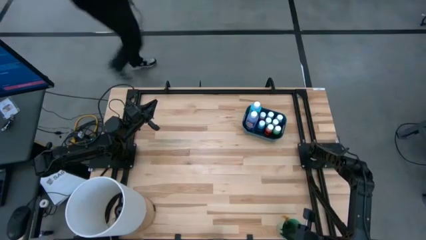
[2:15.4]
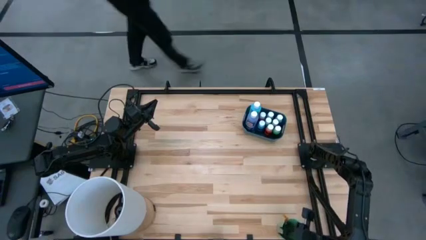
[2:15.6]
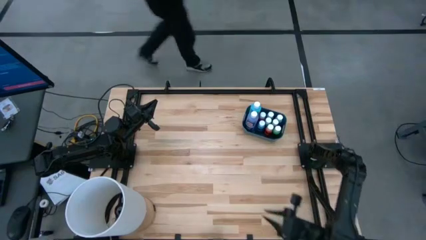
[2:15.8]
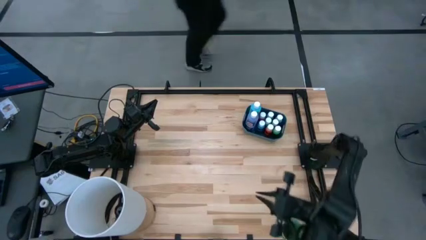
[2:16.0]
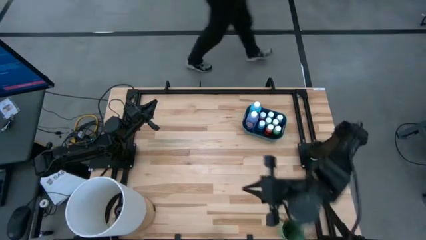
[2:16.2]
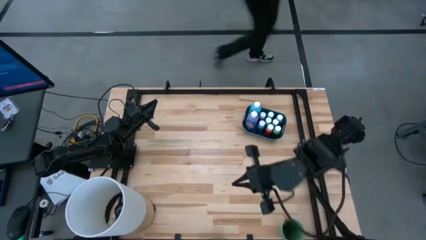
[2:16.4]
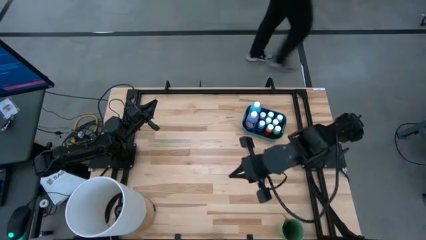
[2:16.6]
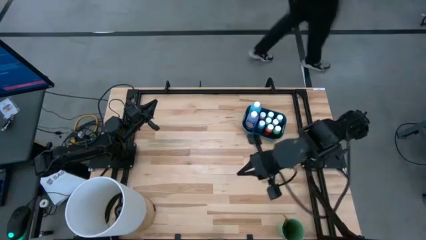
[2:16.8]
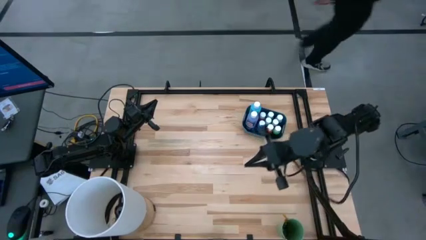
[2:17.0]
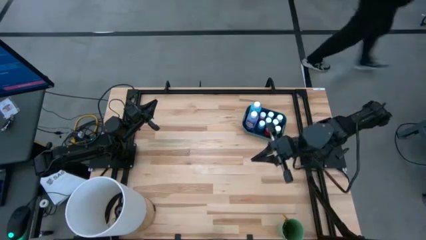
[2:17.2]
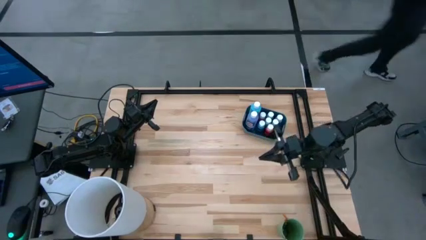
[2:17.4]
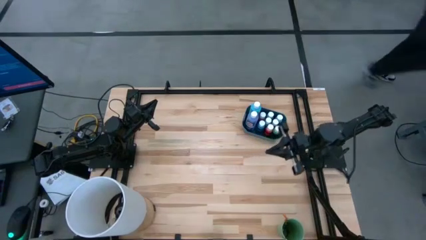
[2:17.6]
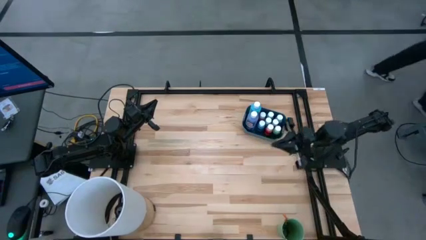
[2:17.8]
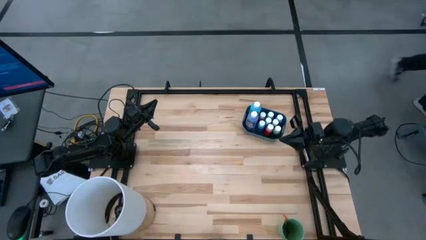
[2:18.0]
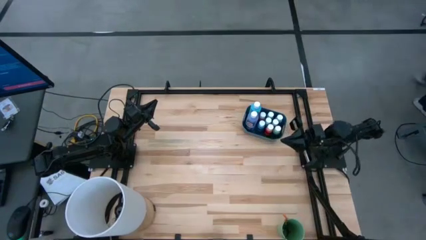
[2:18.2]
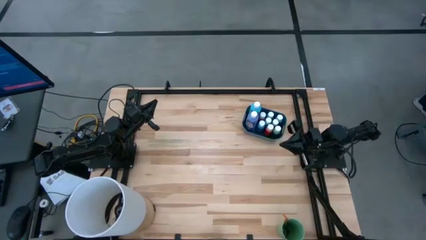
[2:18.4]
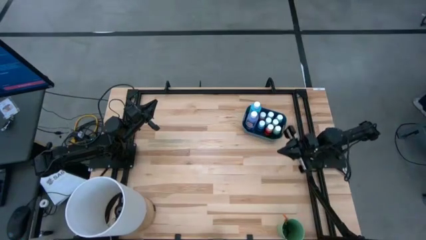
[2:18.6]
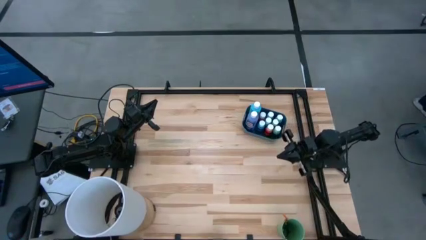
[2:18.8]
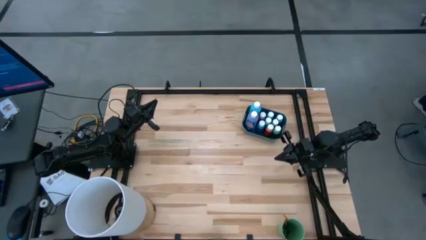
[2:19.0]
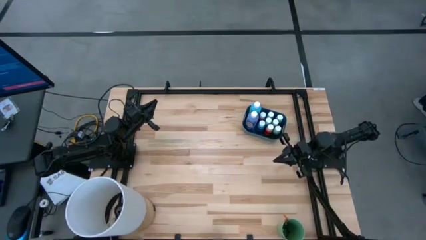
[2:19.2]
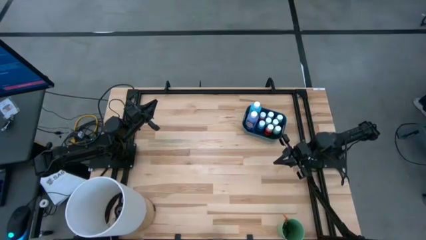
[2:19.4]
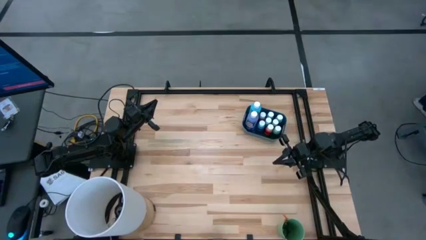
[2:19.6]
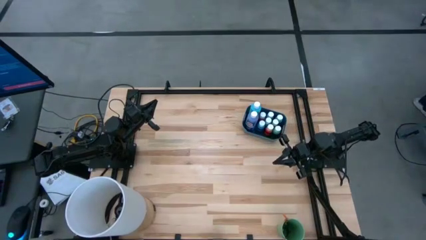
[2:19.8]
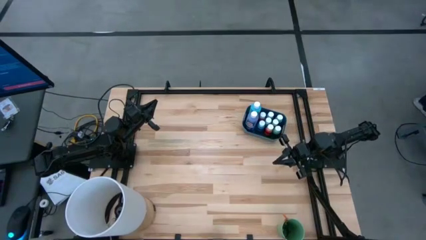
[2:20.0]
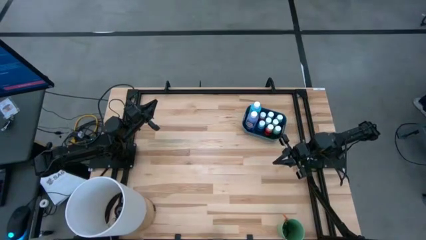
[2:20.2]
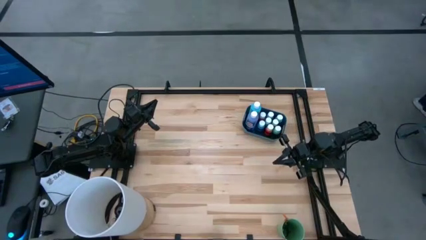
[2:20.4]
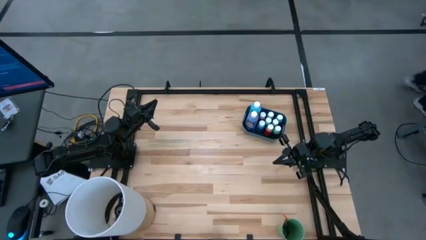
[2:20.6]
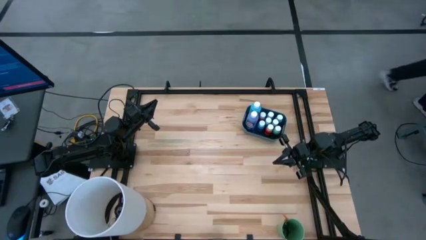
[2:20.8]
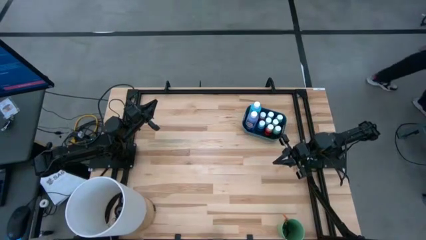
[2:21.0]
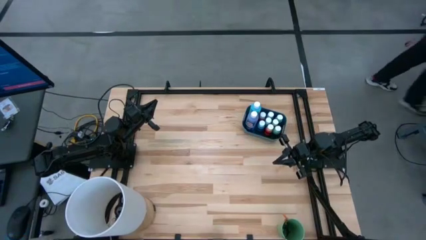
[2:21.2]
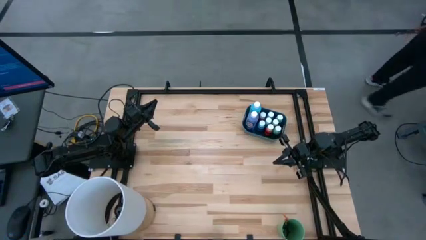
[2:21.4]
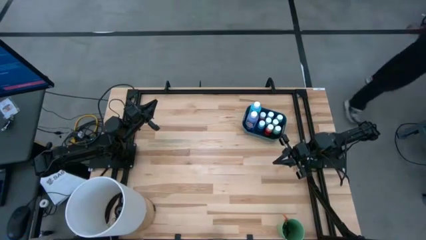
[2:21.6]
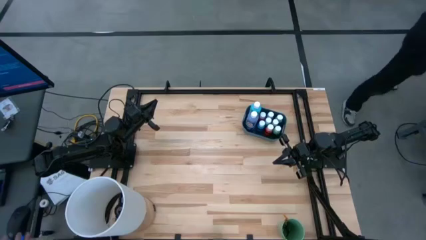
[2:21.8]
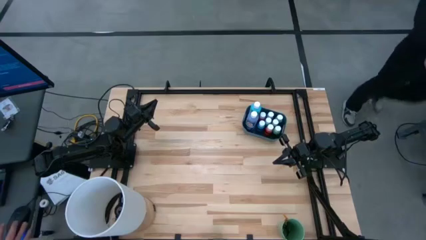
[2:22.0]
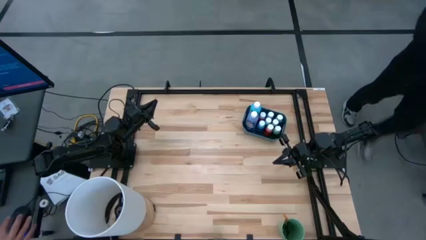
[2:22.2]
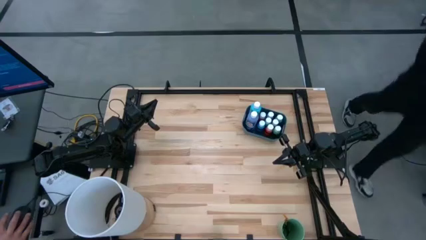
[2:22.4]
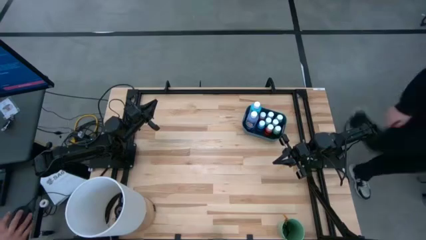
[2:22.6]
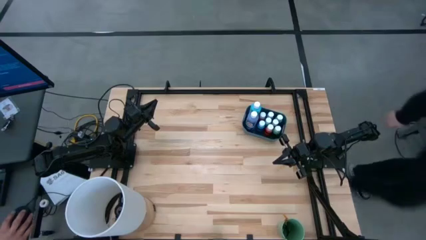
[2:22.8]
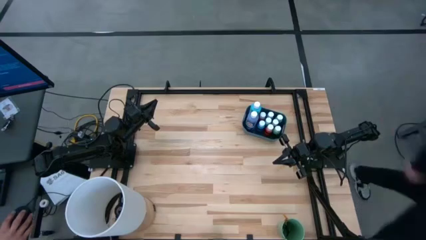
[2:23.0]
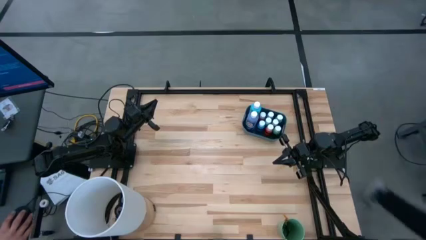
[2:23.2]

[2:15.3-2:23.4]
Task: Pick & Place Paint Supplies
Return to Home Position

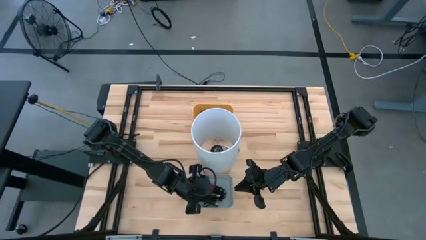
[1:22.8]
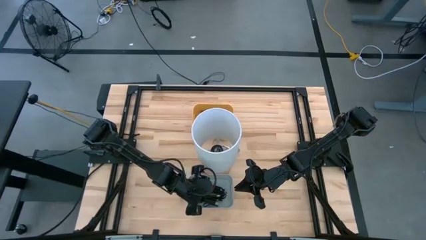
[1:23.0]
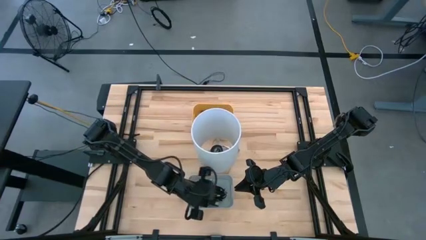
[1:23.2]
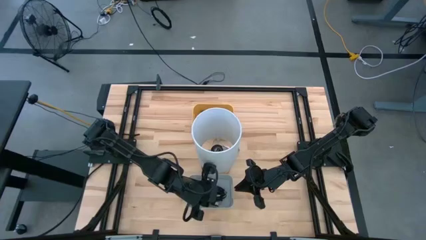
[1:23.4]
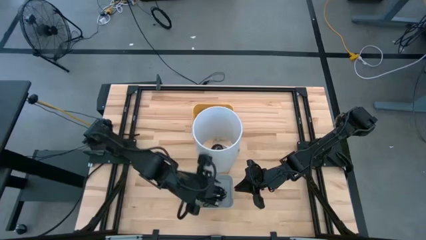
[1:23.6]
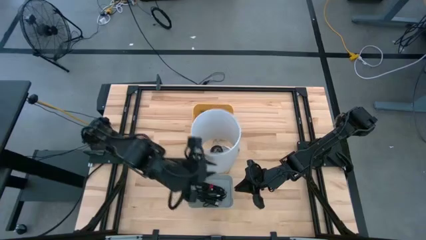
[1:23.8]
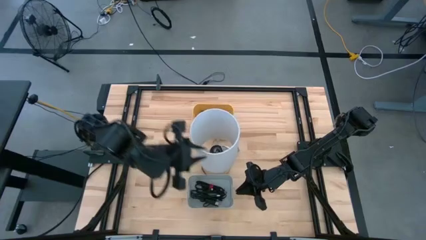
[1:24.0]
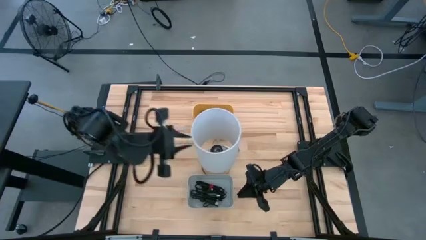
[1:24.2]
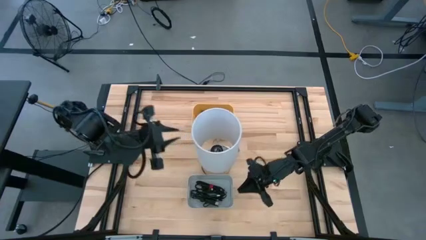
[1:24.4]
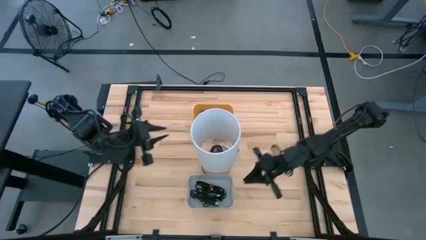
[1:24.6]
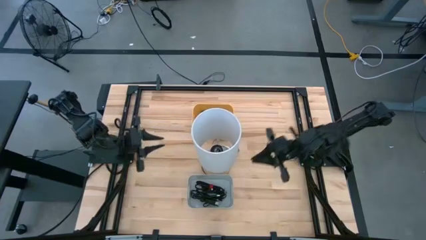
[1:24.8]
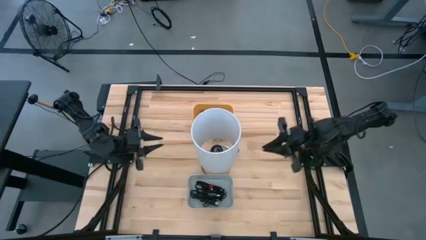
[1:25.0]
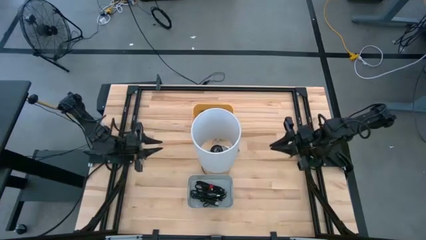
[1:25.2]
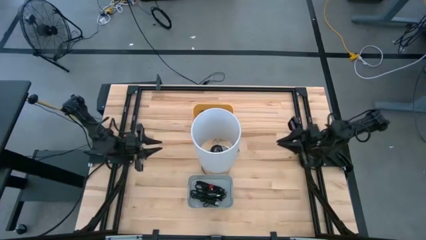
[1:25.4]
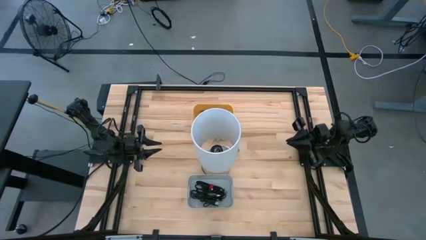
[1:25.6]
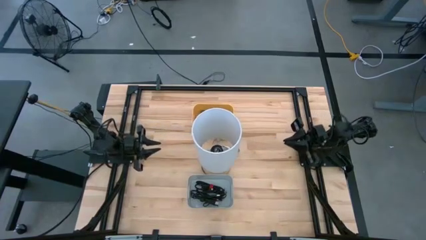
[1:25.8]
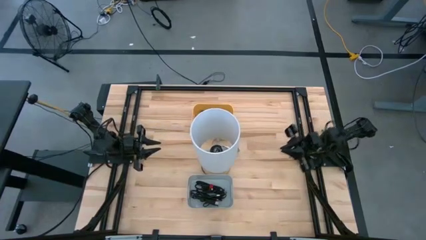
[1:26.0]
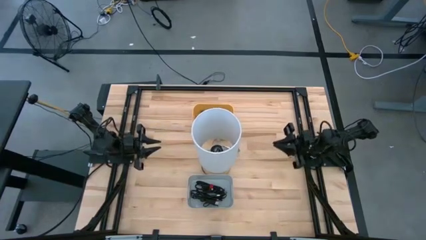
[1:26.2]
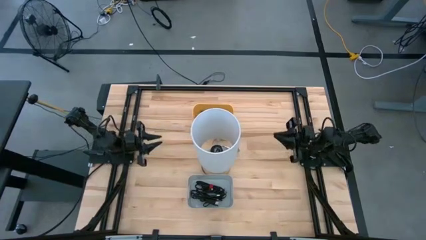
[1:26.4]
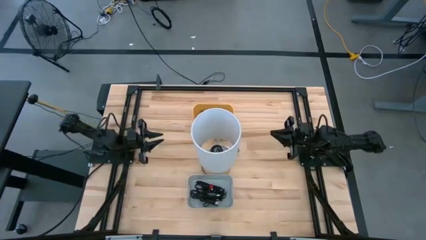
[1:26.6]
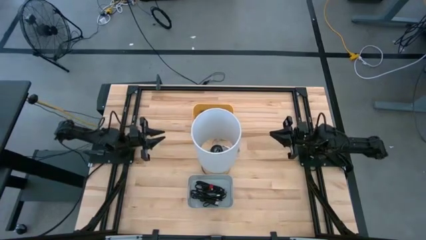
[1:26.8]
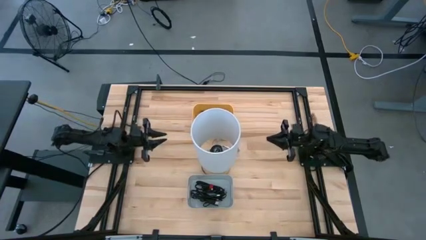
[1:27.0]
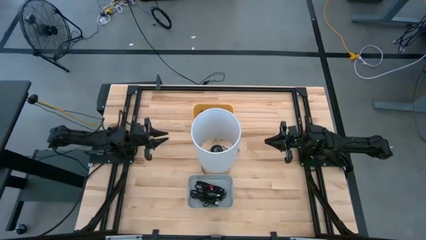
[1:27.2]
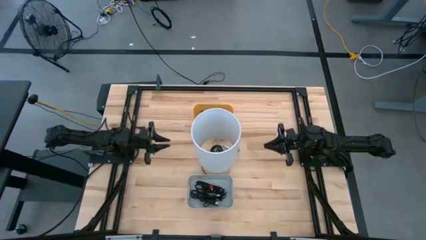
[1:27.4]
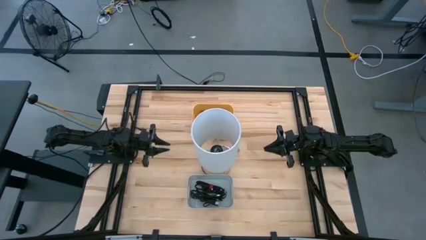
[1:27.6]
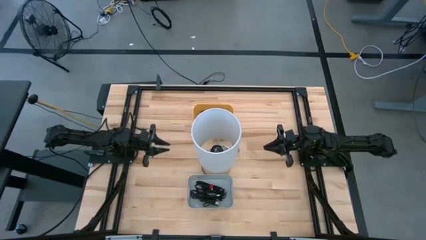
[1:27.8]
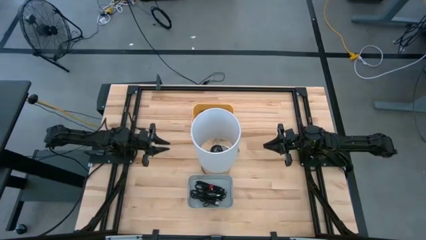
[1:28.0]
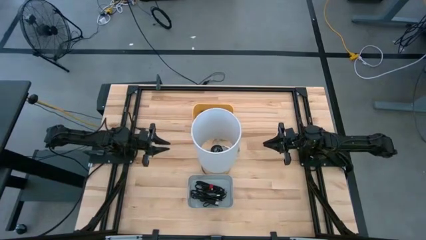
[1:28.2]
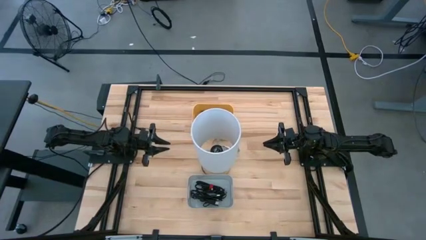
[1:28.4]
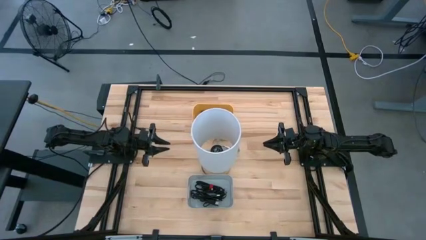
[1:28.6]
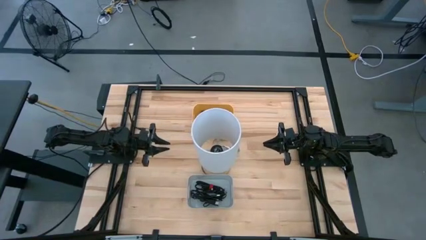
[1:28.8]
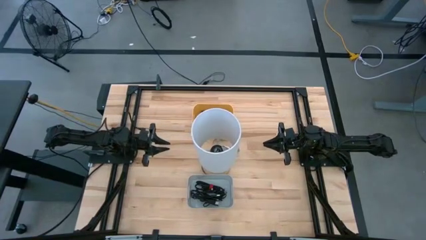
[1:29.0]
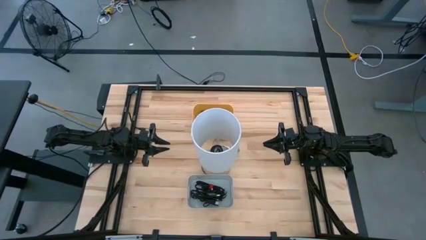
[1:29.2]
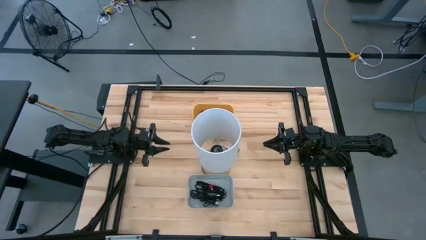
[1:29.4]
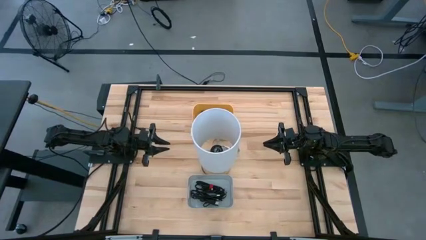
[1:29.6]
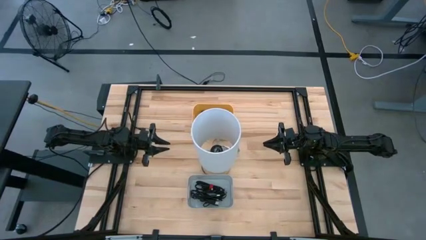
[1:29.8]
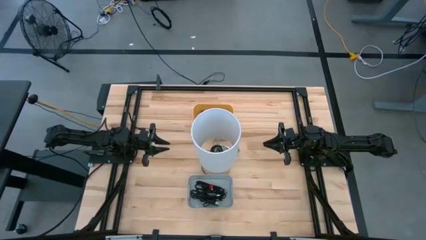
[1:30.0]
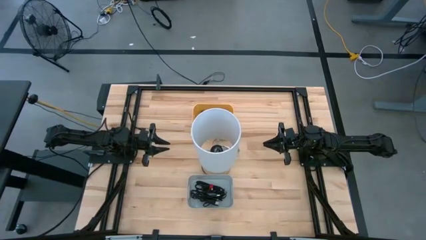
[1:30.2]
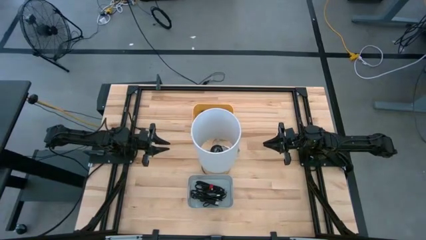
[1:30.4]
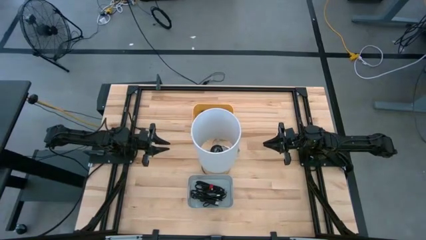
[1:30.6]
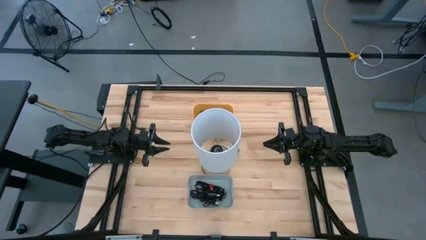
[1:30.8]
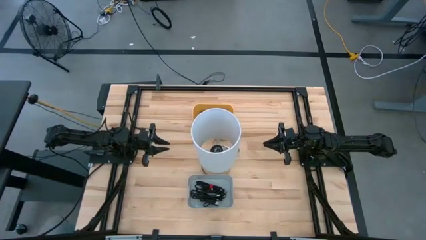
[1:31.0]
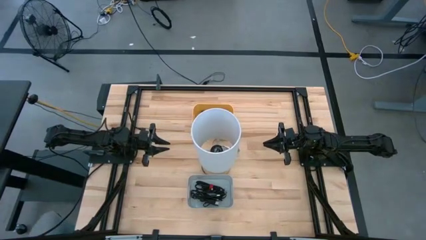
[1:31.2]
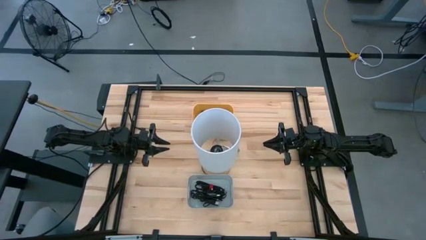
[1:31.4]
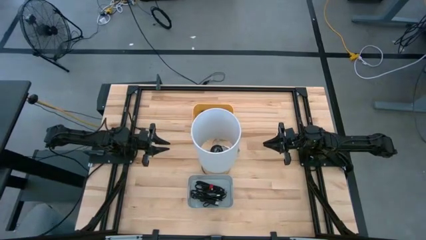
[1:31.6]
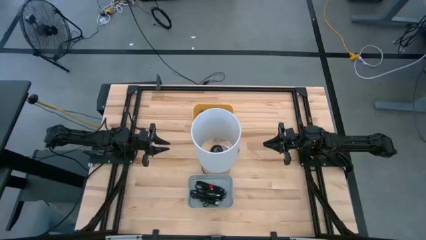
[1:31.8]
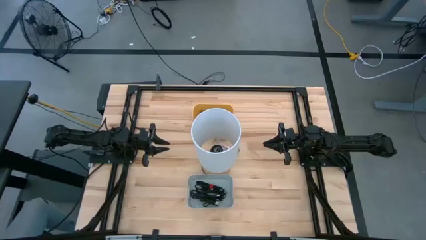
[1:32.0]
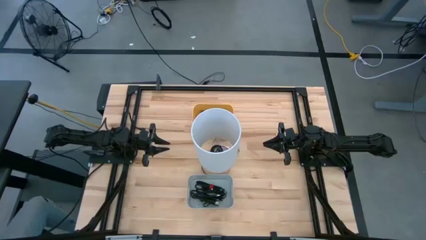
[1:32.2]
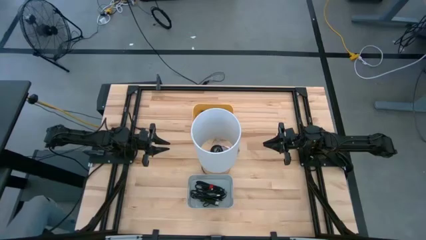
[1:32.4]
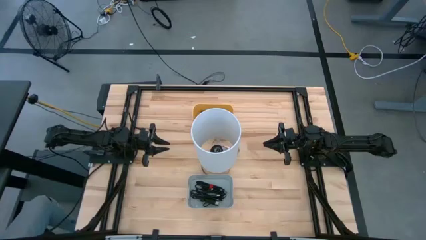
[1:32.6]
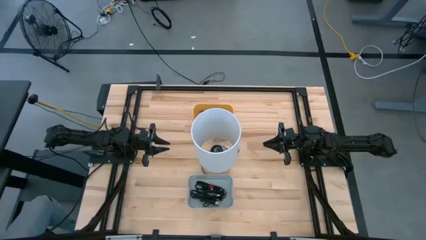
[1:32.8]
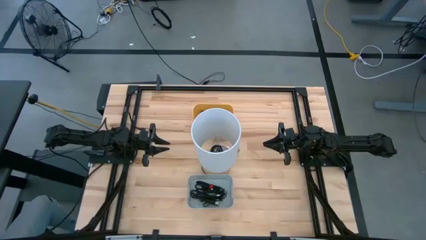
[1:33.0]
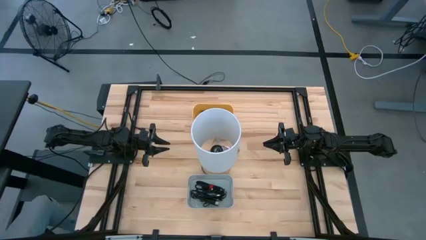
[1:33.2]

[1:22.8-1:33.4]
Task: Pick & Place USB Port
Return to Home Position
